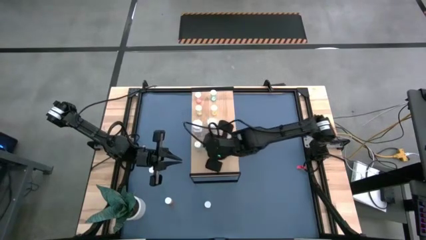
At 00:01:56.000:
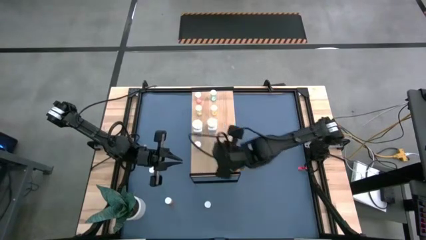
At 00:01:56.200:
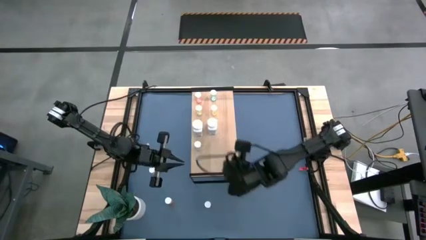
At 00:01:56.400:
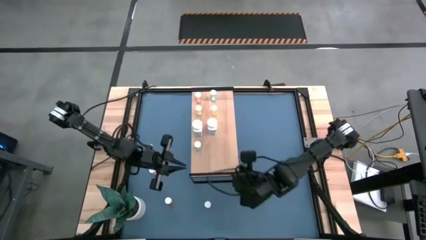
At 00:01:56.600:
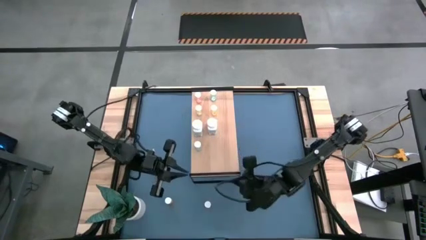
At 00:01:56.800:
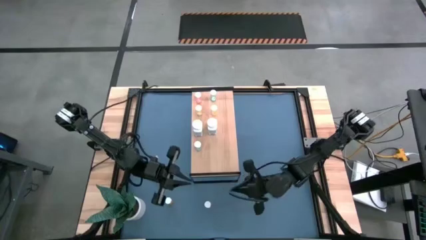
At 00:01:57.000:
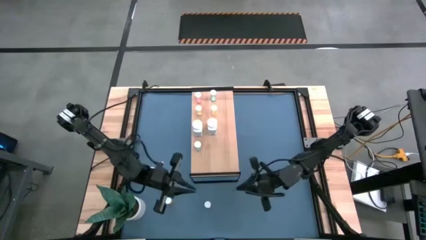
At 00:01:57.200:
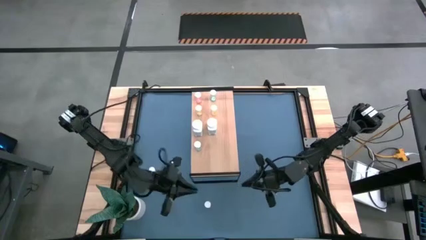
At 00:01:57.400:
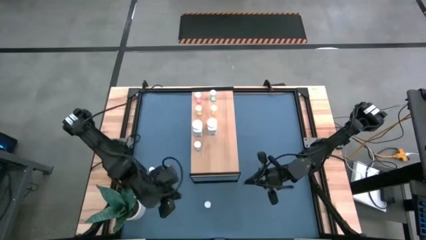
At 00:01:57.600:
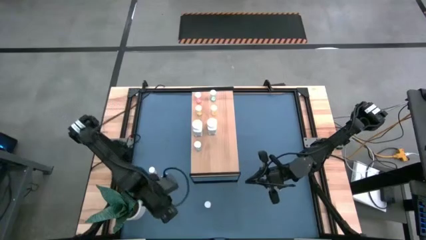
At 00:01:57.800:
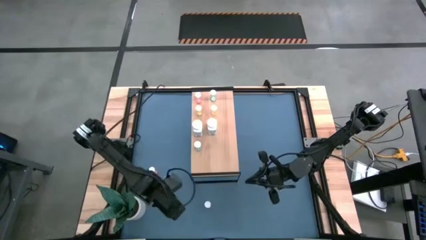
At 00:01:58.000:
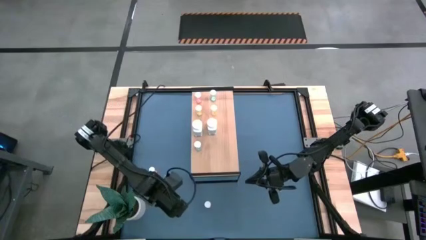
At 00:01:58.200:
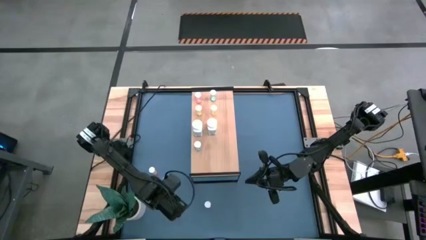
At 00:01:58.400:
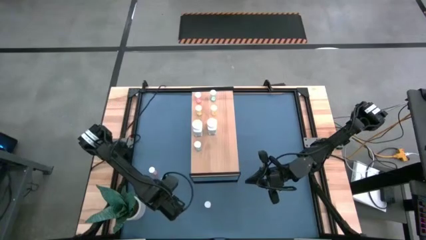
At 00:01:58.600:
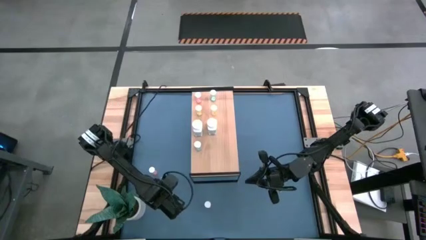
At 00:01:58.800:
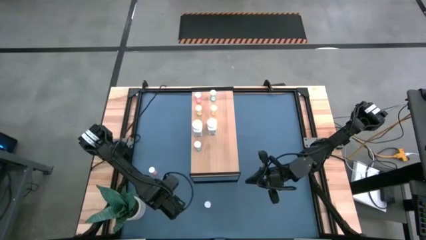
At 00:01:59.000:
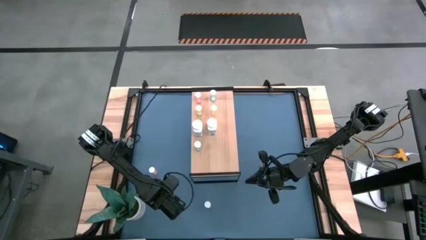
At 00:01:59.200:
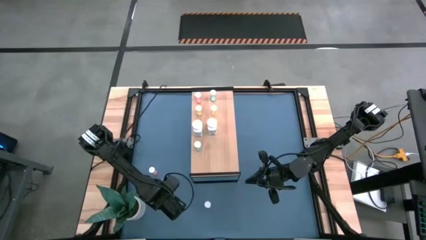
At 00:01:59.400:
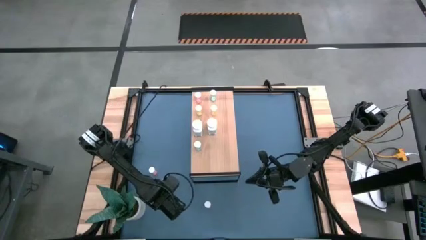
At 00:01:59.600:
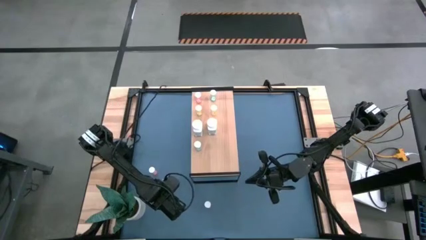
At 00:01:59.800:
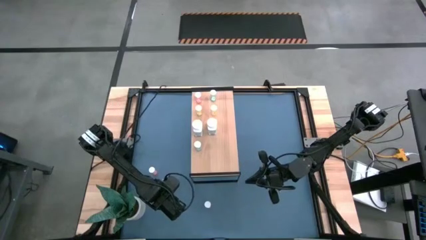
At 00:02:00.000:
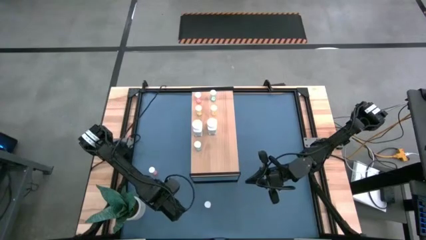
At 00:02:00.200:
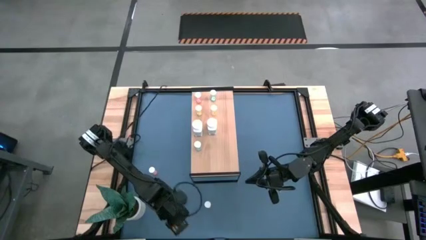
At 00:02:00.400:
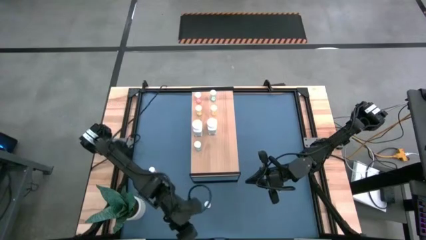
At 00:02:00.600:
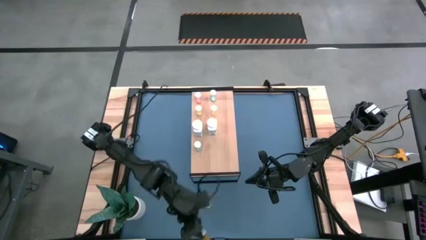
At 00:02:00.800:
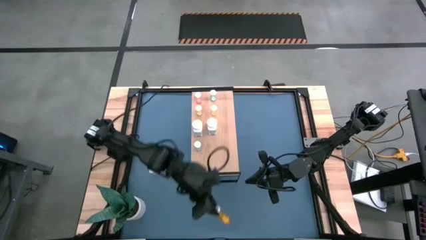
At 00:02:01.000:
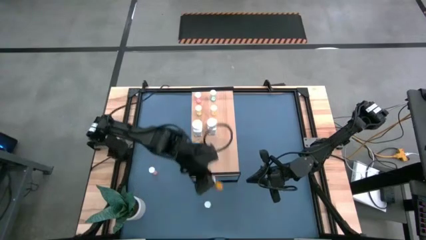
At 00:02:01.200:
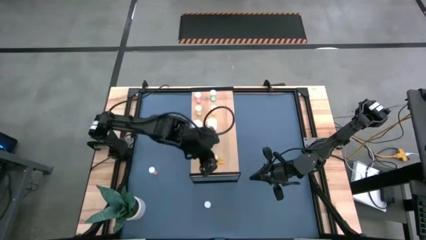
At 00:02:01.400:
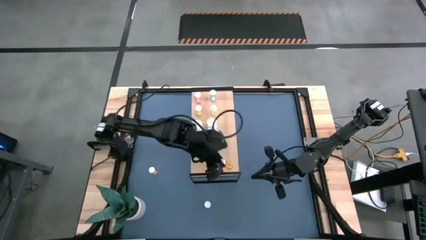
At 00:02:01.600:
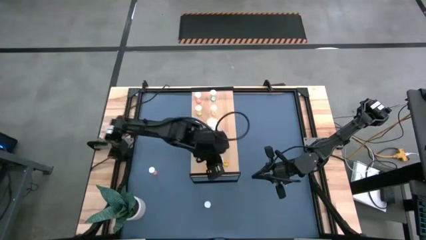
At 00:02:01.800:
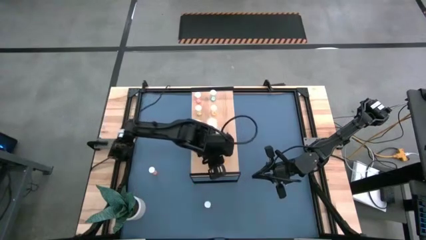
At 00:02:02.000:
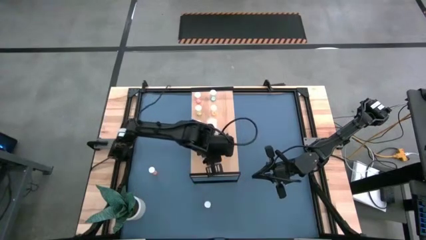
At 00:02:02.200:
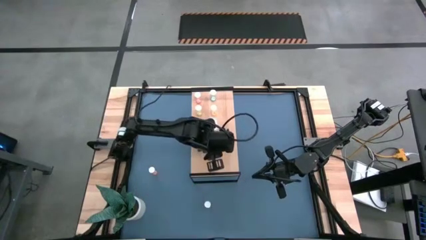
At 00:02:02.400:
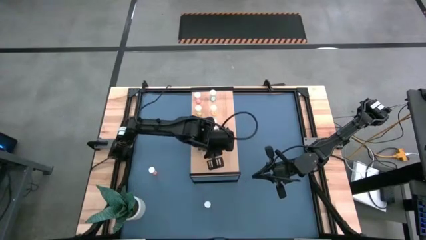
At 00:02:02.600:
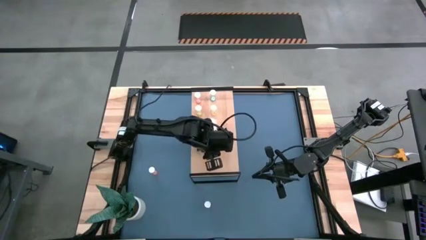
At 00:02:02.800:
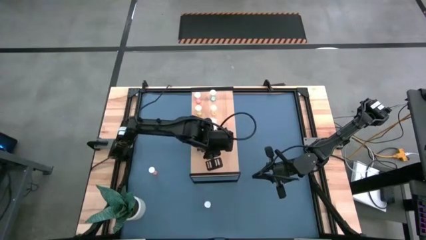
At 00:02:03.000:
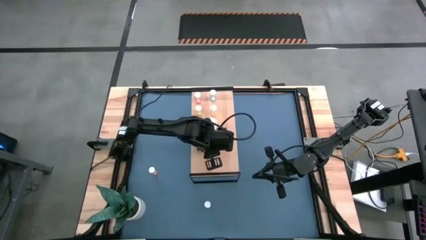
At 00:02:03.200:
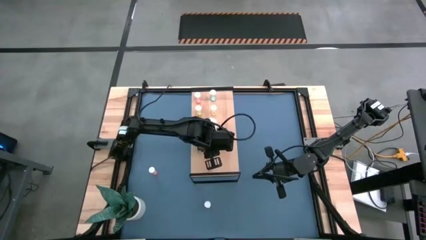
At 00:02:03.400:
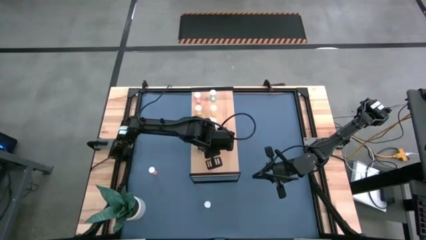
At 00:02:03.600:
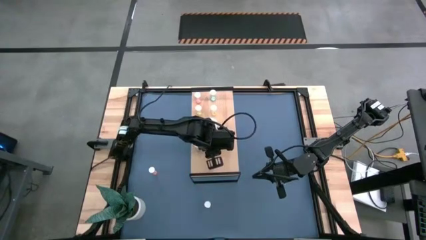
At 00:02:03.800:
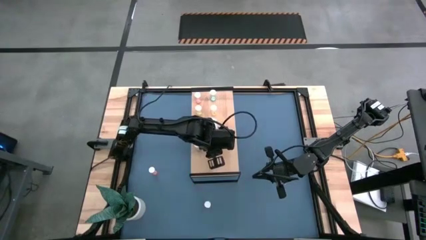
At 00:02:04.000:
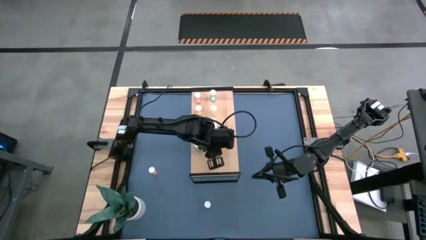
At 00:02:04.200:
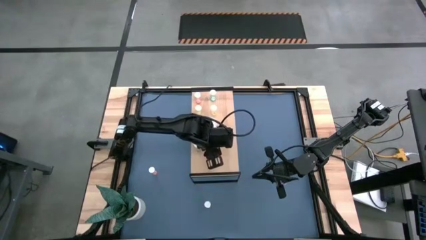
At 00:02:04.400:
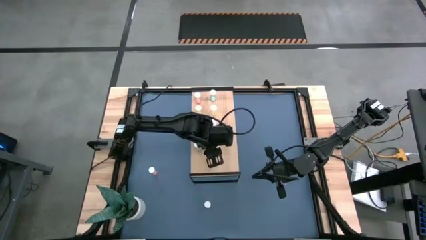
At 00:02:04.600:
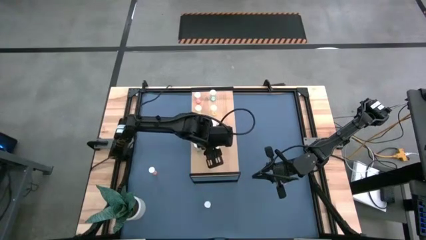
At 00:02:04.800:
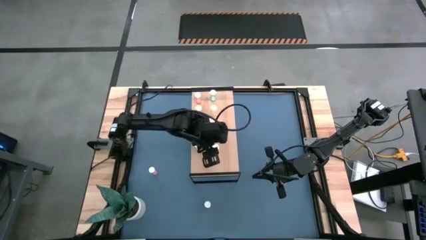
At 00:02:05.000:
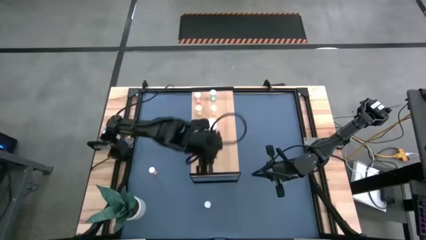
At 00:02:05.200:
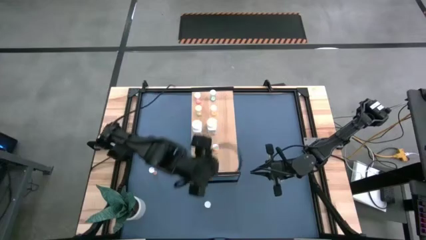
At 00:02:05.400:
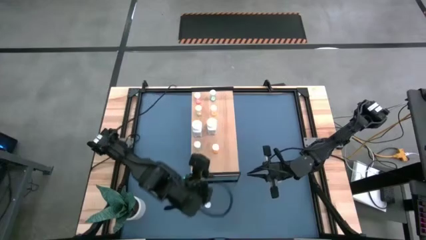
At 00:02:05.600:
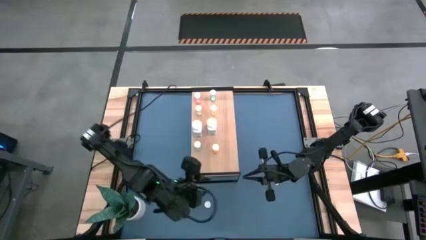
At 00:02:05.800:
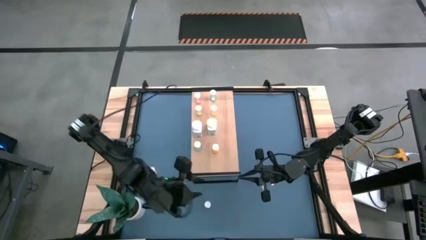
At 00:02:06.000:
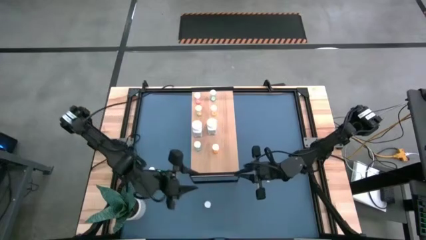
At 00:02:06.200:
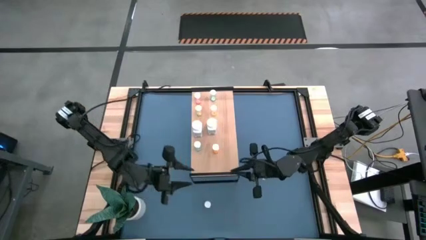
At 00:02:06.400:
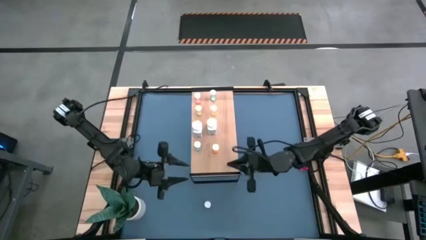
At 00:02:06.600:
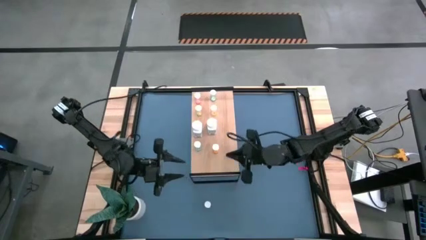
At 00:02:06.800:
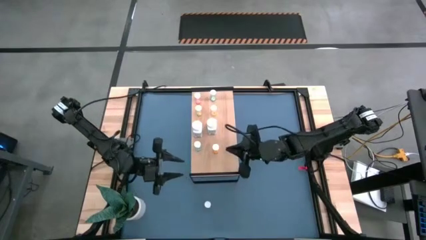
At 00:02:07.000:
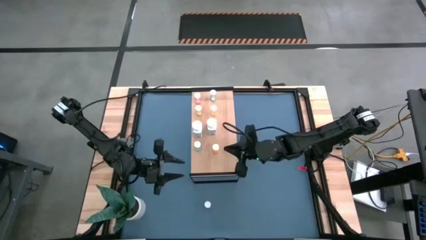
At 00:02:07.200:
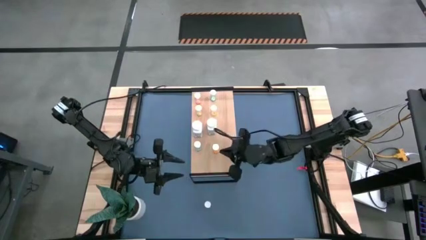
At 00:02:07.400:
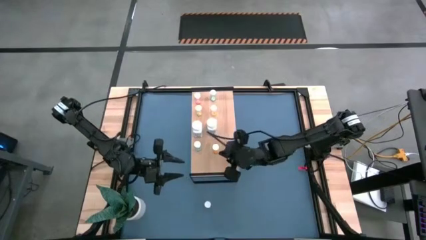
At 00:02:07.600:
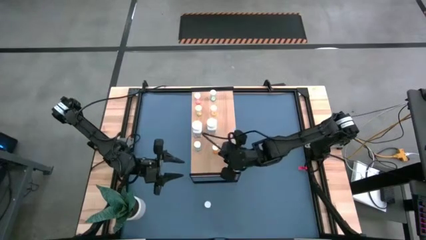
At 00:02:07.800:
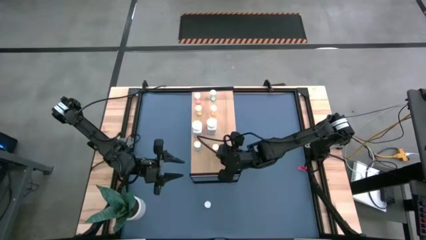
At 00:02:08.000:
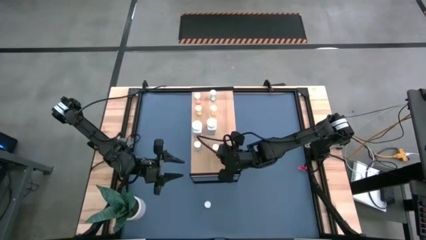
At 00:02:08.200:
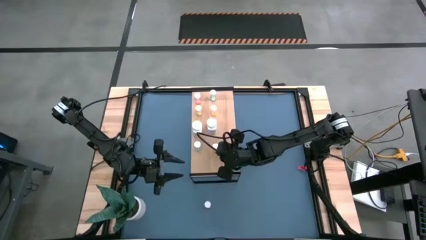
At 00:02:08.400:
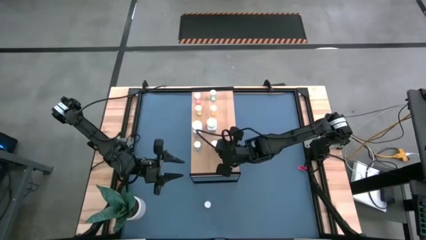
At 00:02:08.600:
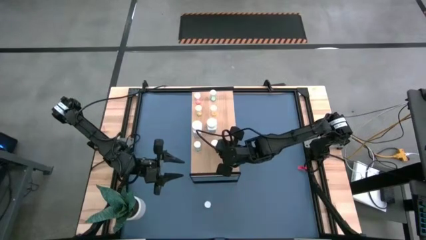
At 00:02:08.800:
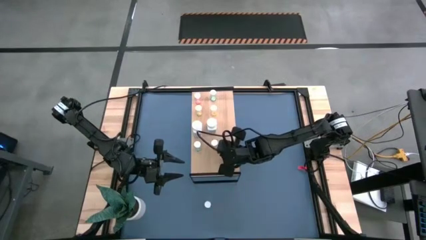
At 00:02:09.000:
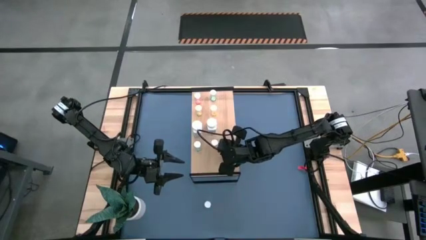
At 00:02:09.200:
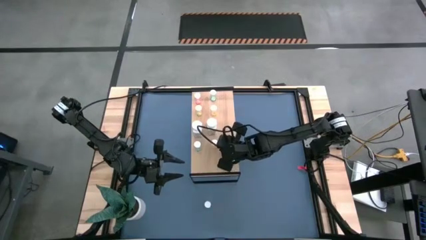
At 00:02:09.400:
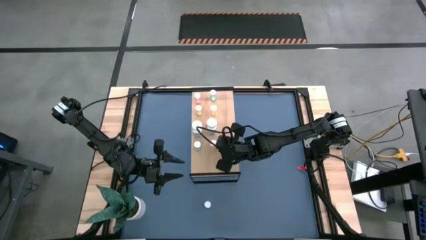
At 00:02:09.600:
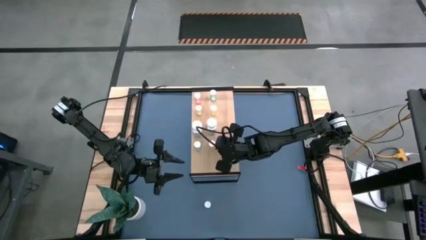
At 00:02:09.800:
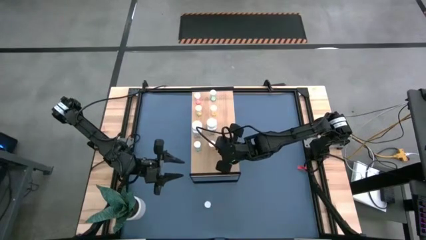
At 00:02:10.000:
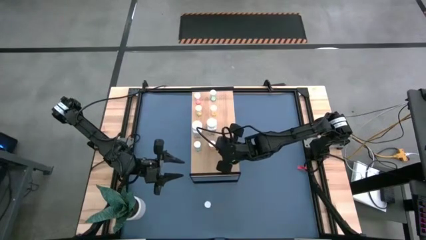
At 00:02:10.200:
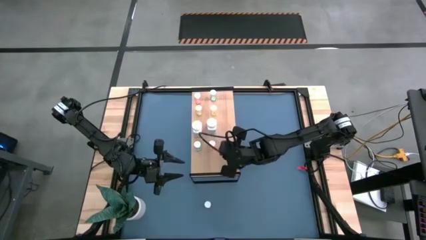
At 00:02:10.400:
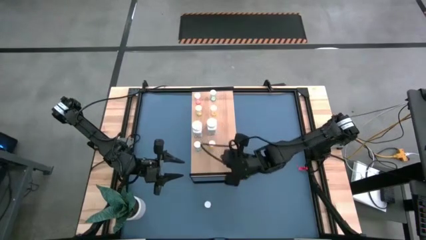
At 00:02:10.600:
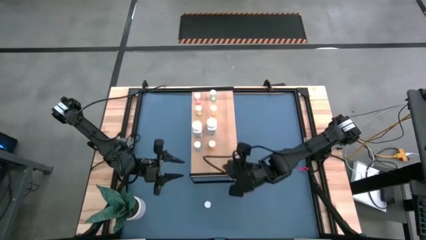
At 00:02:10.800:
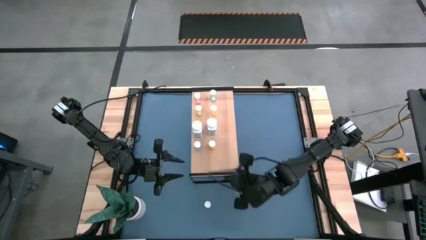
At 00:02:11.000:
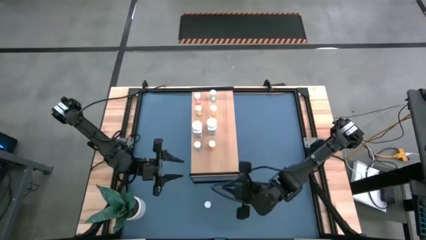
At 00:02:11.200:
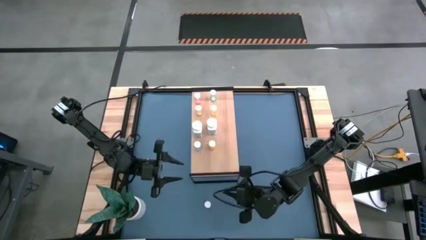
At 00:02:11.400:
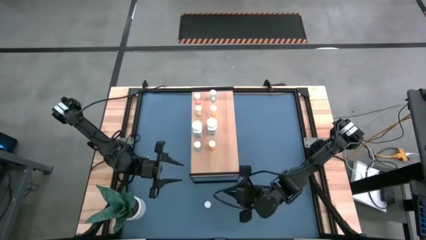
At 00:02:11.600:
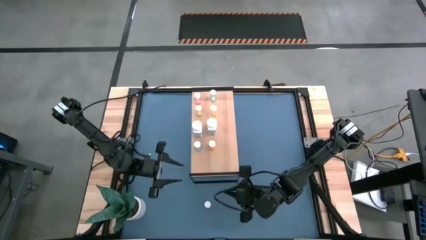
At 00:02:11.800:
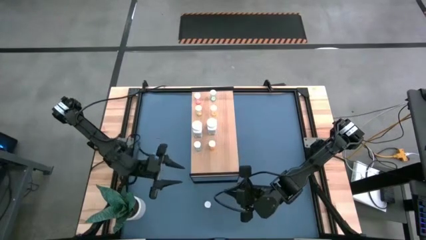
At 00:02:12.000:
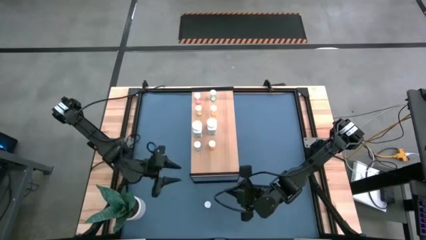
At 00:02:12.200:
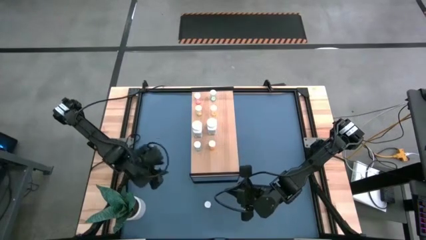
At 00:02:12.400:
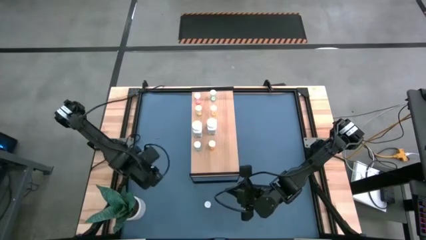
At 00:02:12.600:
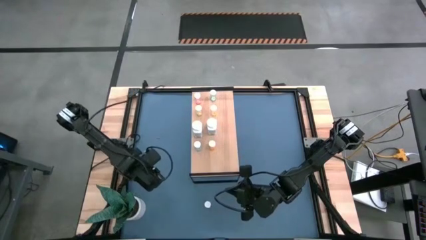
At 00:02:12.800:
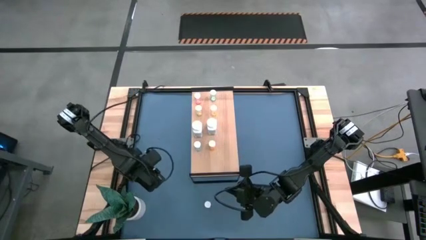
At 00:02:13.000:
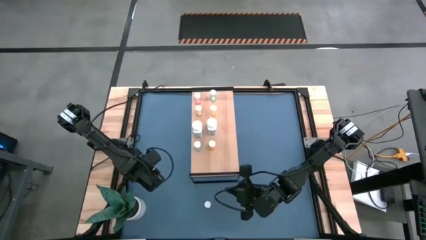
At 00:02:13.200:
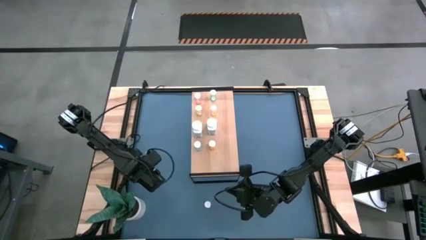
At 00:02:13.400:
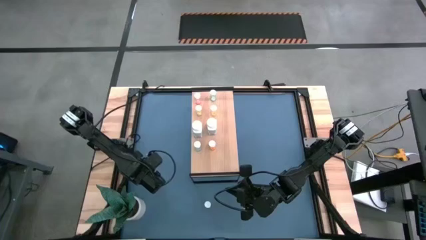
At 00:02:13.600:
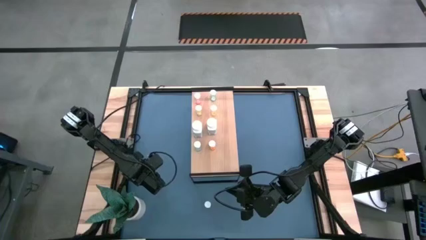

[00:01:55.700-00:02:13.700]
Task: Pick and place medicine bottles onto shelf by color
Put the orange pill bottle on the shelf aligned with the blue pill bottle
